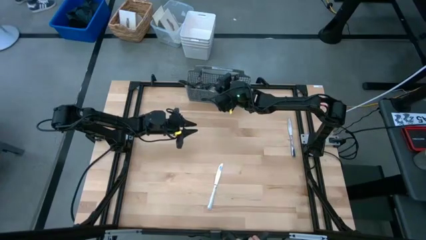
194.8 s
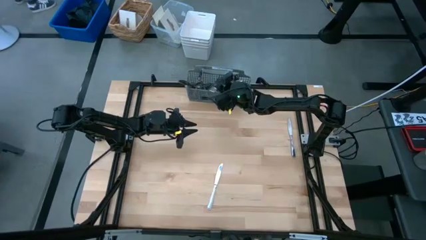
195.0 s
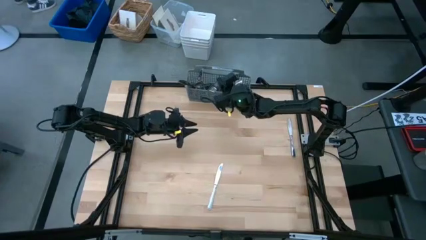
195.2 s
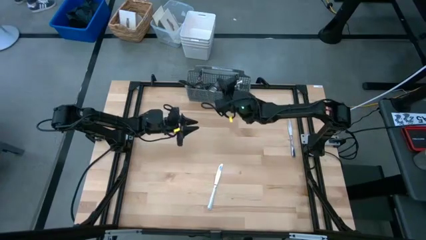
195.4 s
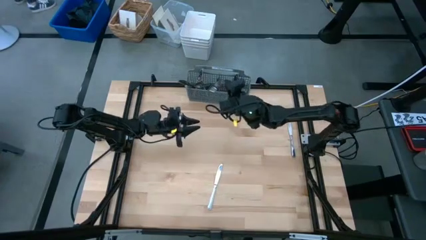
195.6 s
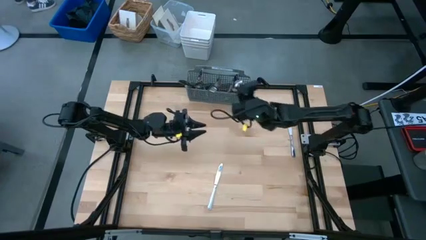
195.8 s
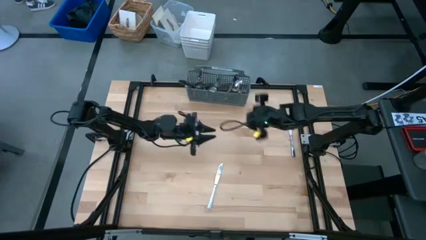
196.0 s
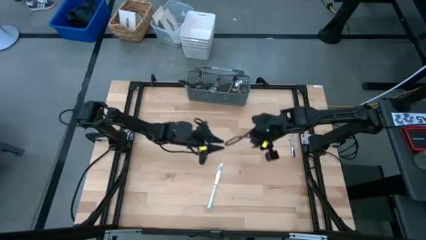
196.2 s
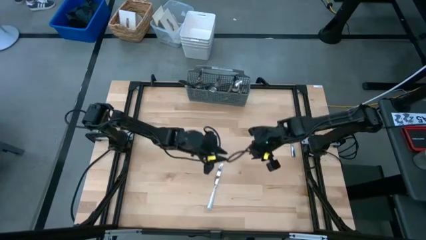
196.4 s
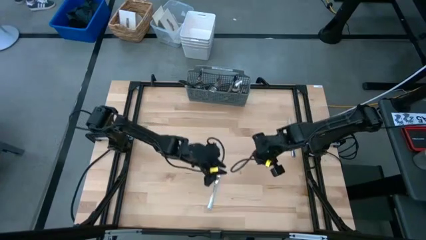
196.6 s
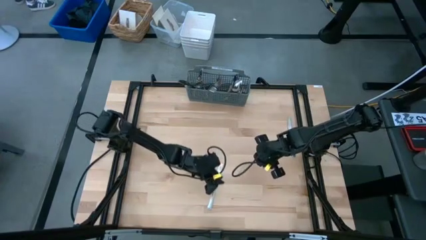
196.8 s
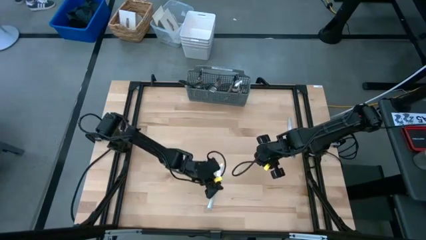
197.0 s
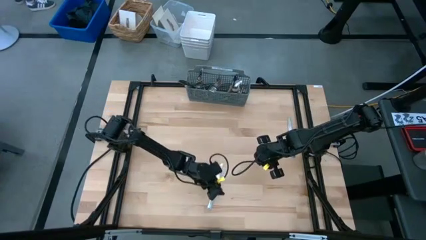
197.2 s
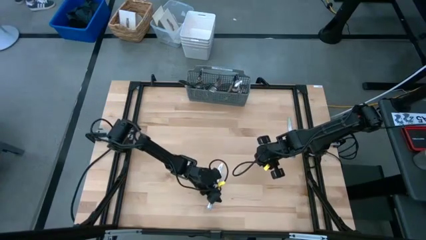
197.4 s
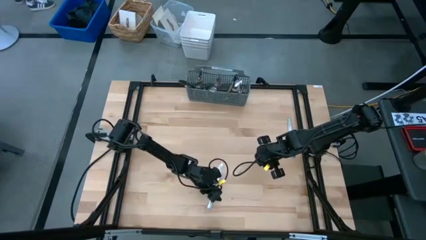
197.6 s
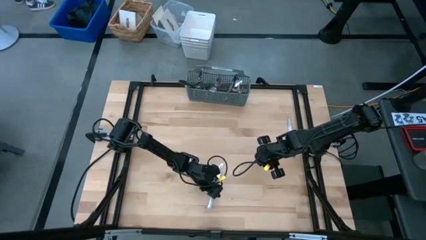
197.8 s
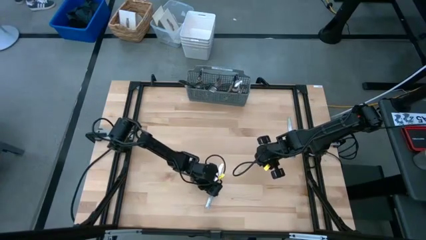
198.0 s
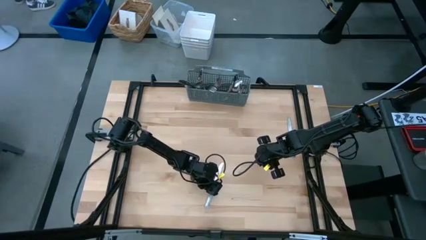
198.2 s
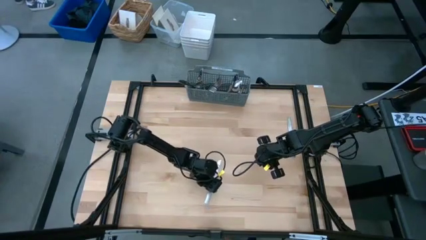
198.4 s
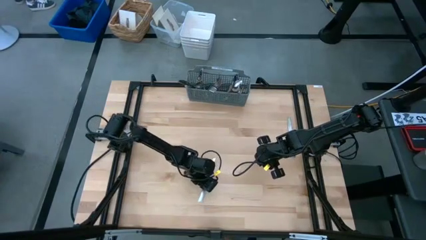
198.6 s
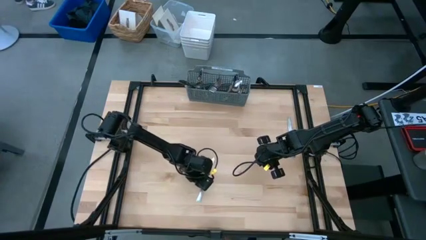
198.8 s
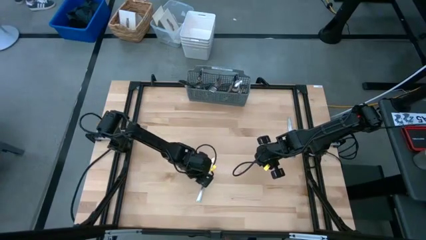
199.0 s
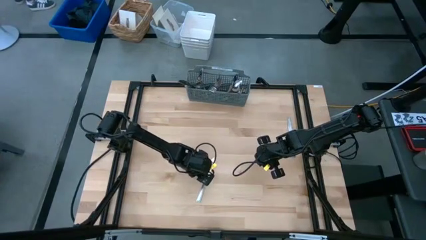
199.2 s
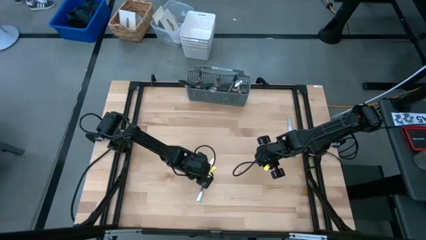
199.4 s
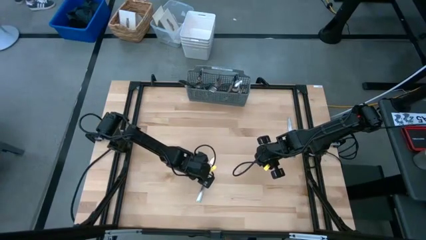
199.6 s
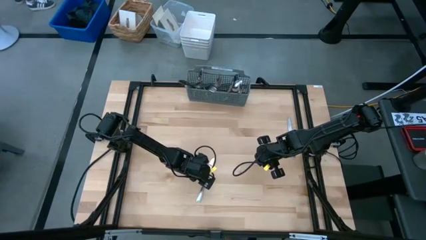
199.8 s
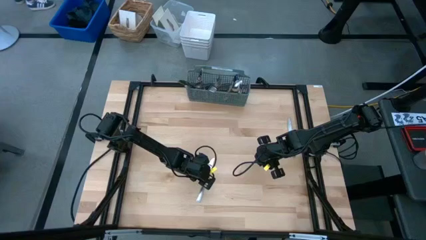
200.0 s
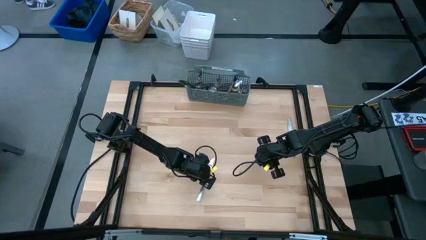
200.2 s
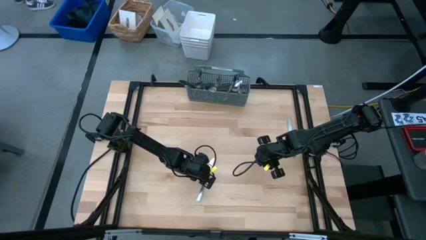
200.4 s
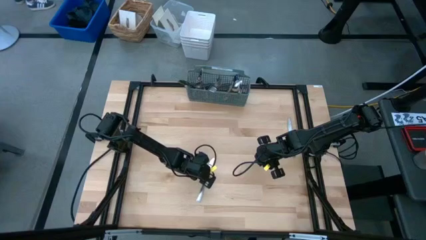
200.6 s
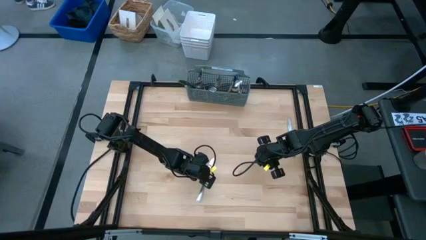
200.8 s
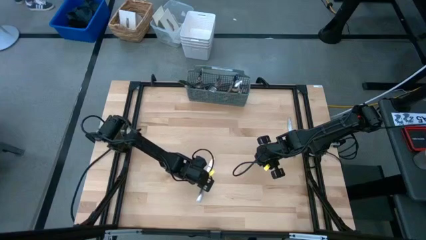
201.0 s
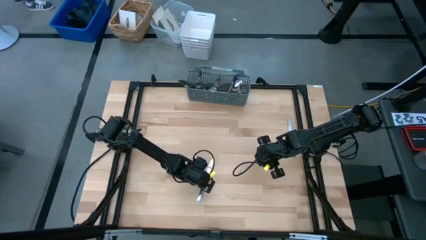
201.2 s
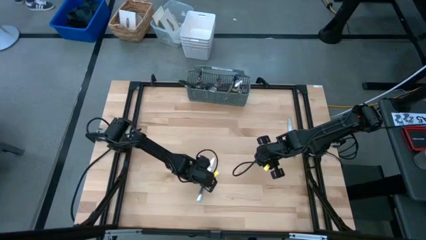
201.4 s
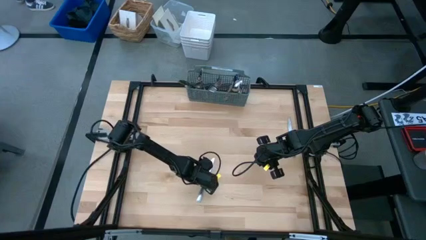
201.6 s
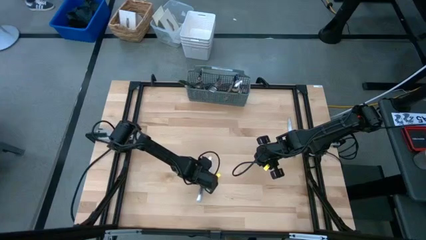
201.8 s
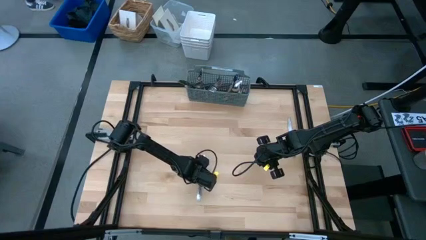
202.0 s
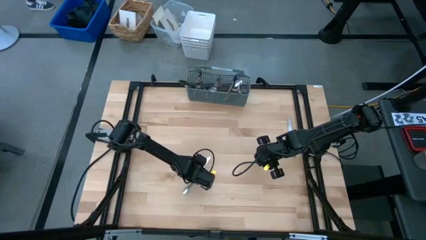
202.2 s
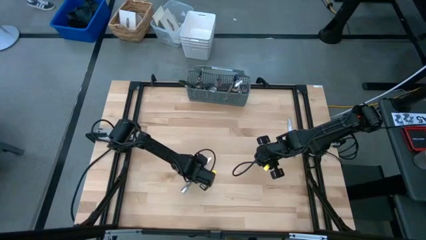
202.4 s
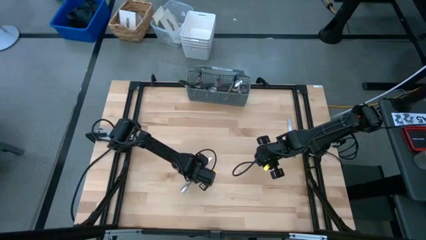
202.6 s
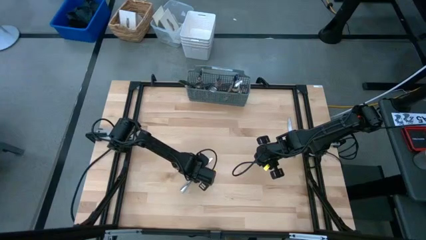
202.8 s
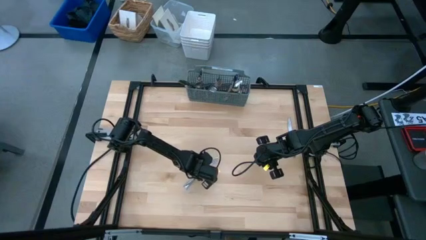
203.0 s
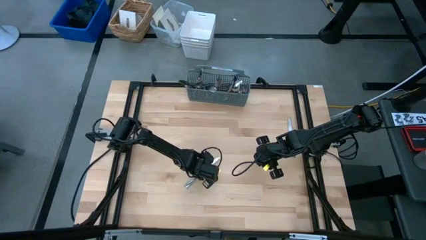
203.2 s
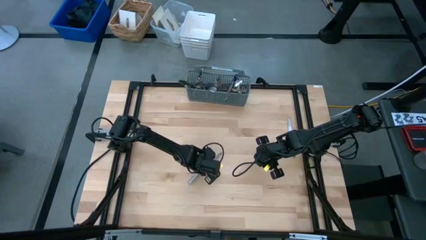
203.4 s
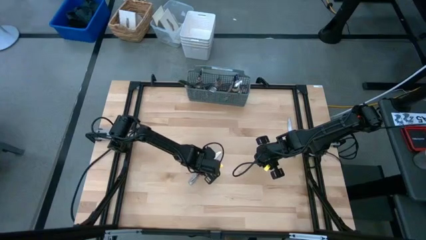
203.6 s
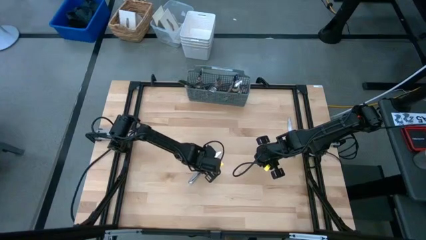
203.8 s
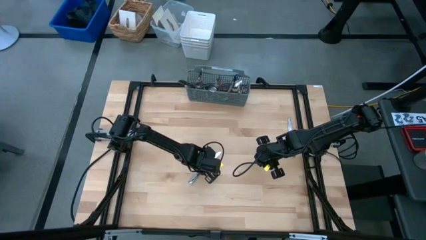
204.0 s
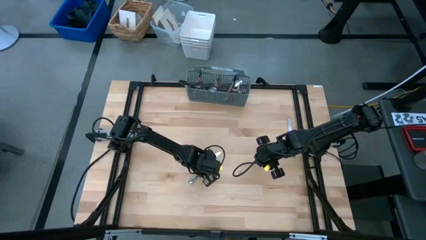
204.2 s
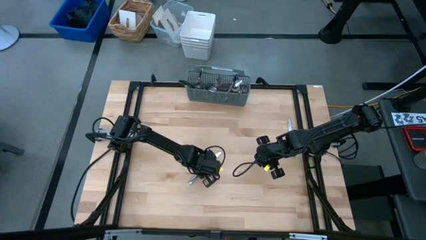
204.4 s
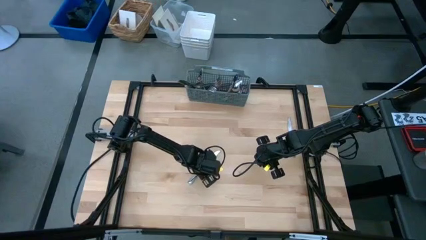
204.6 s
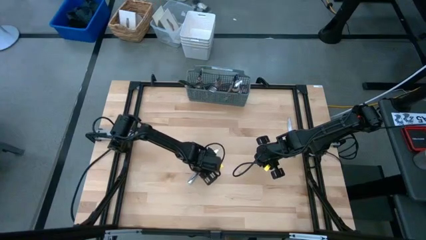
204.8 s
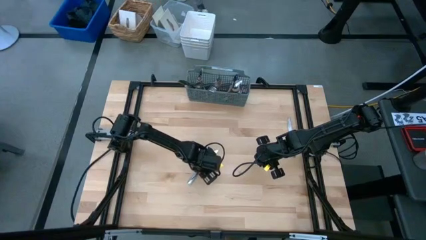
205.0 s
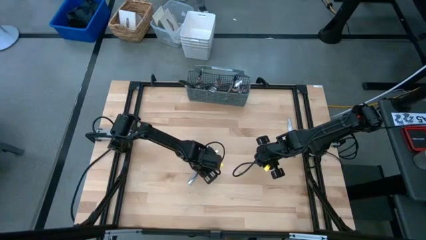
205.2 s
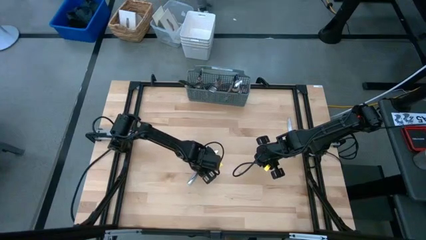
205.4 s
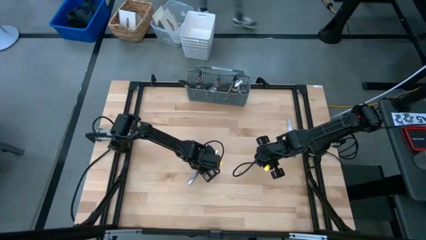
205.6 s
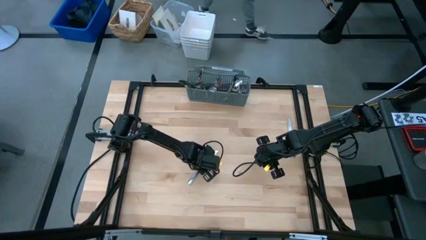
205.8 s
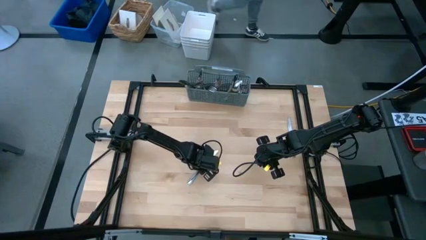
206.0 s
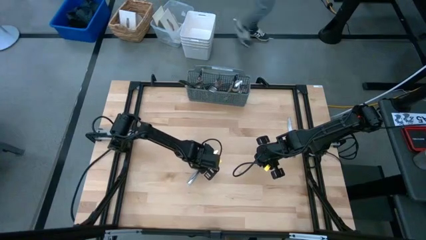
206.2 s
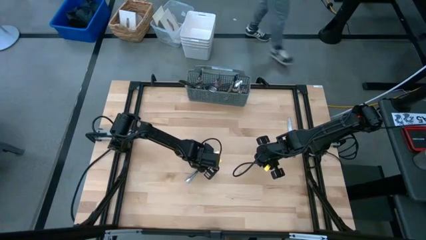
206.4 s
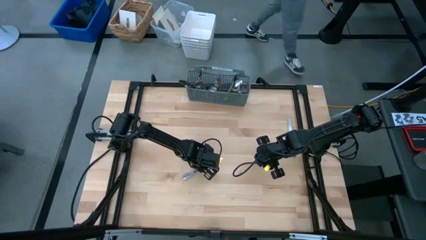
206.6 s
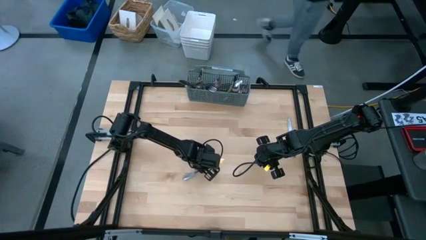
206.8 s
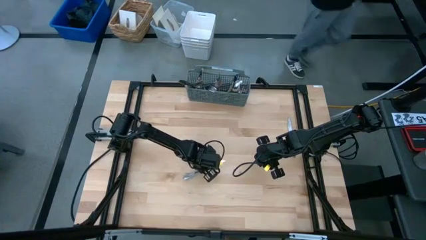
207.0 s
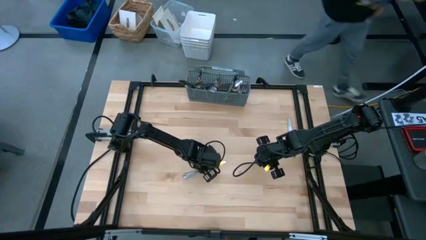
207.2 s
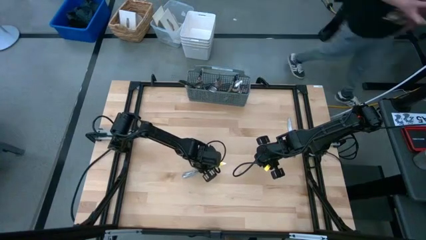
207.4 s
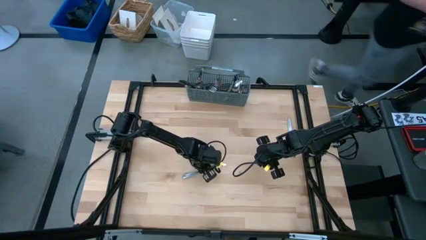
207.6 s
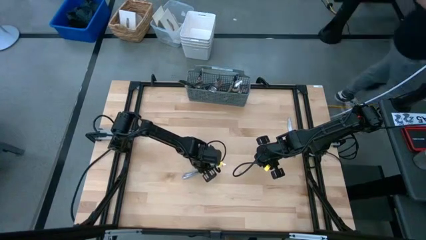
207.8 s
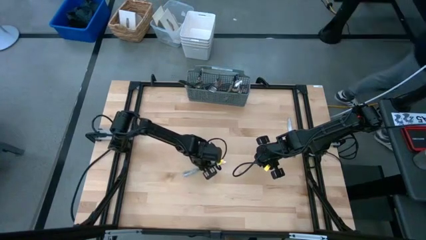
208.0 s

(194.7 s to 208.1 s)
Task: Sort silverware
Put the table knife into the gray silverware organizer

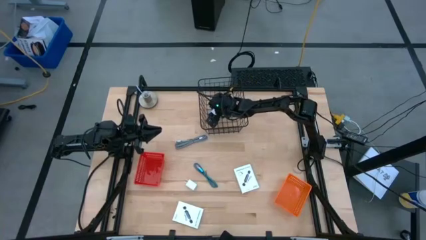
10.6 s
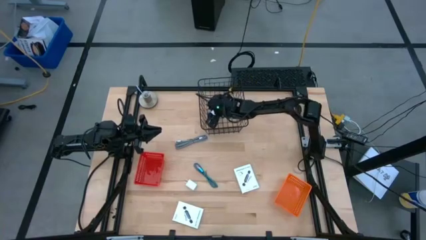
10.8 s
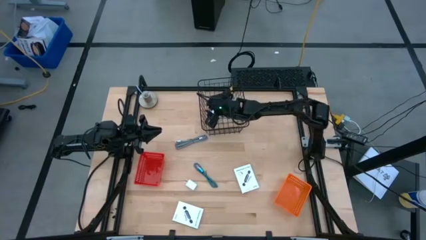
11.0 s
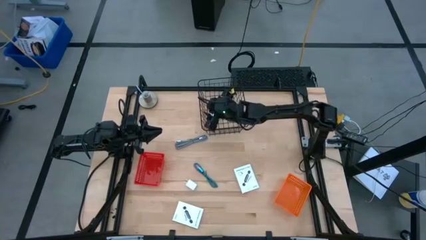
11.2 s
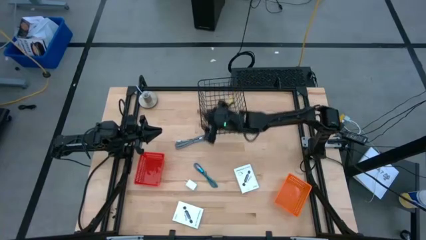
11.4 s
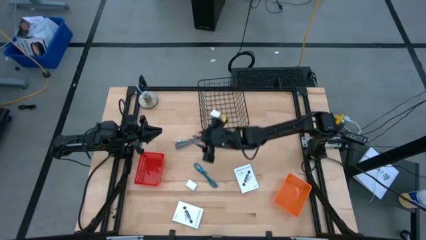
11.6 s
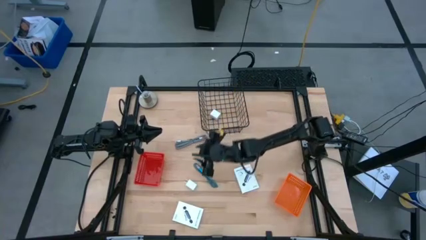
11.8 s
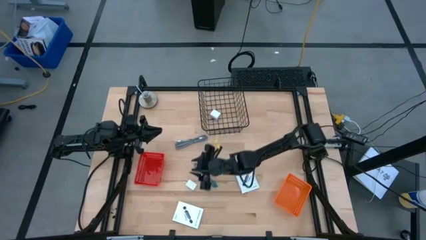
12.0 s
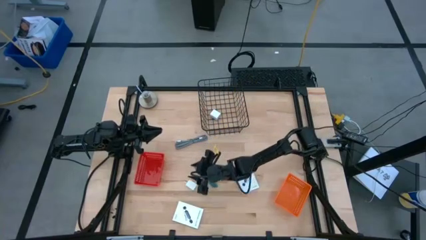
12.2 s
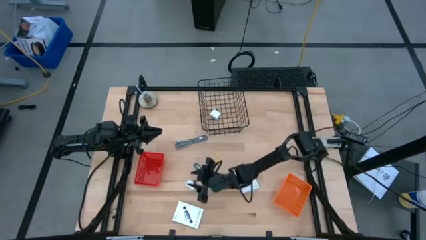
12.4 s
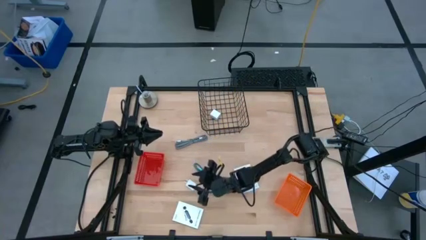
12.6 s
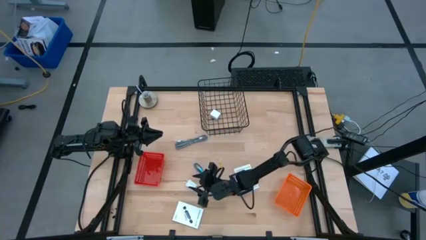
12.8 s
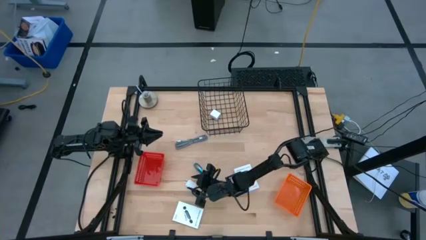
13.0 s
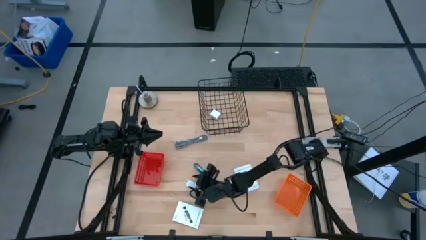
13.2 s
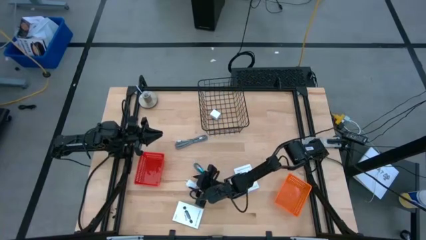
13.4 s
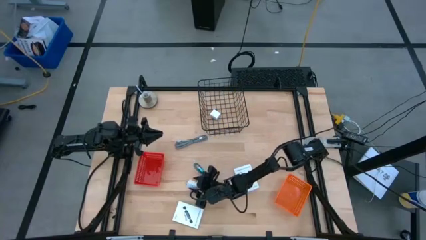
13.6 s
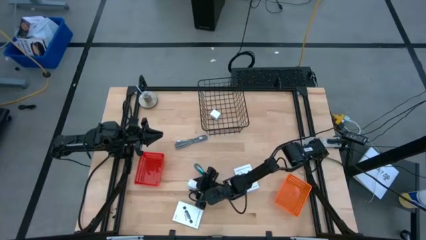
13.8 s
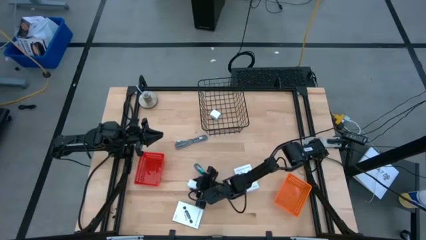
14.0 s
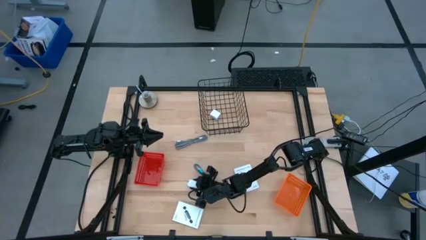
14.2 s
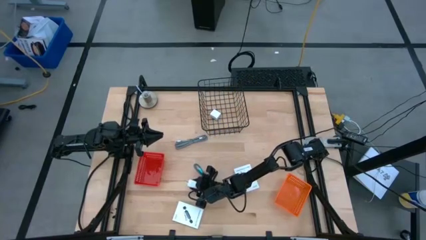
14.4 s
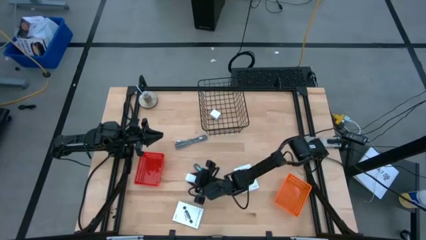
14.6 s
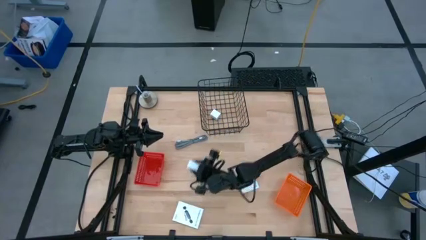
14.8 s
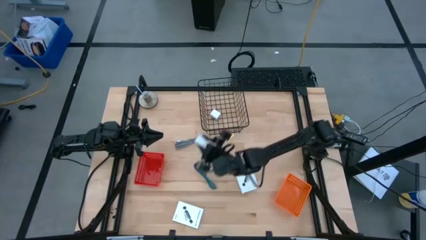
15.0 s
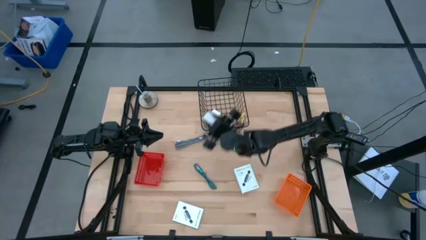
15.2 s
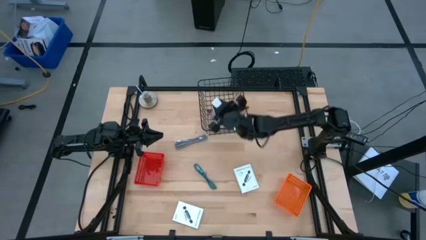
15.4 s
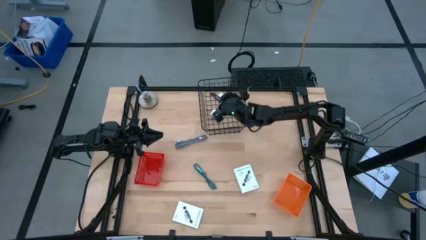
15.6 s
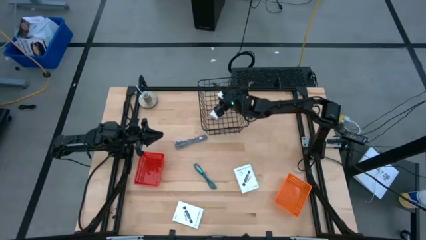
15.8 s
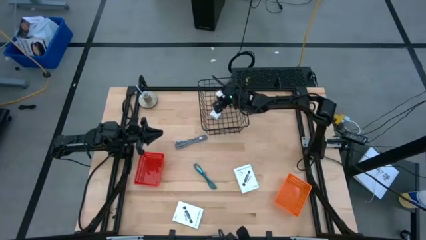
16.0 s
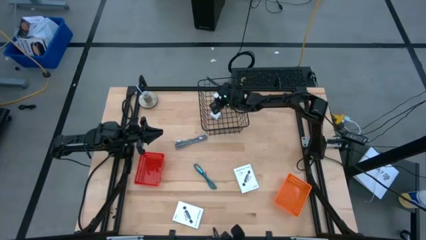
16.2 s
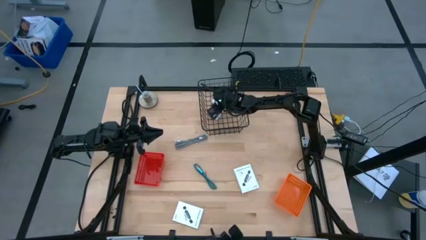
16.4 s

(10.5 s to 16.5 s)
Task: Pick and place items into bin
Put the white charger adapter into the black wire basket
